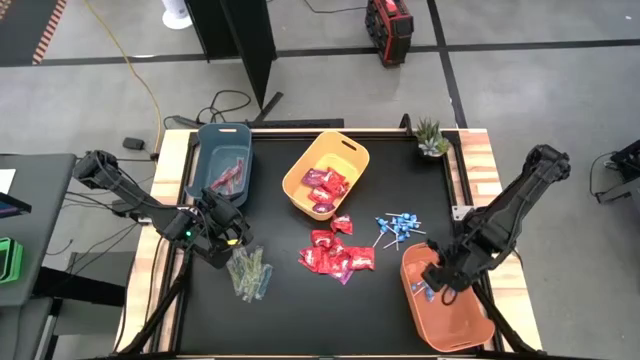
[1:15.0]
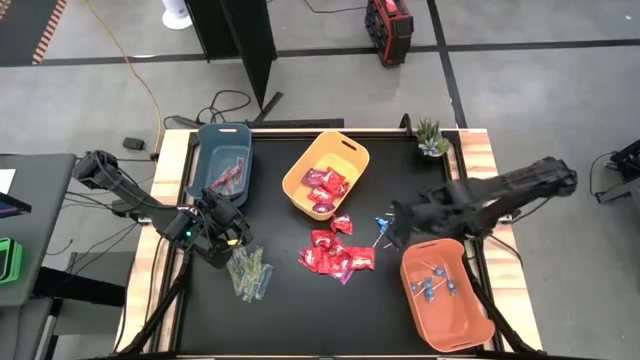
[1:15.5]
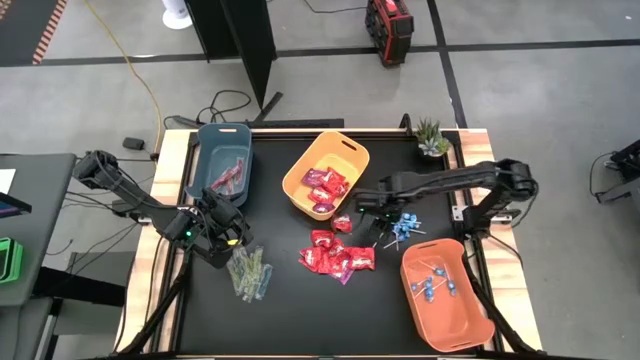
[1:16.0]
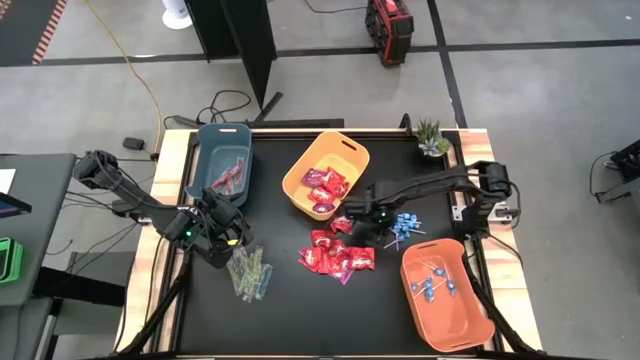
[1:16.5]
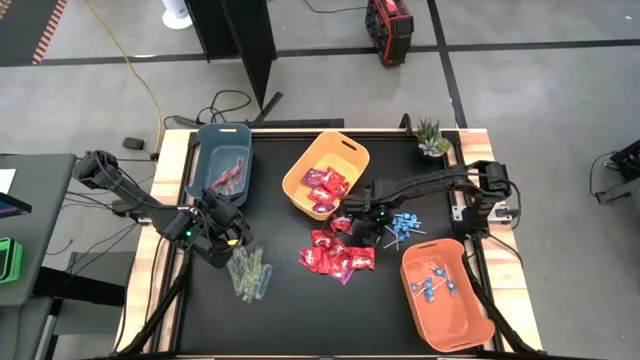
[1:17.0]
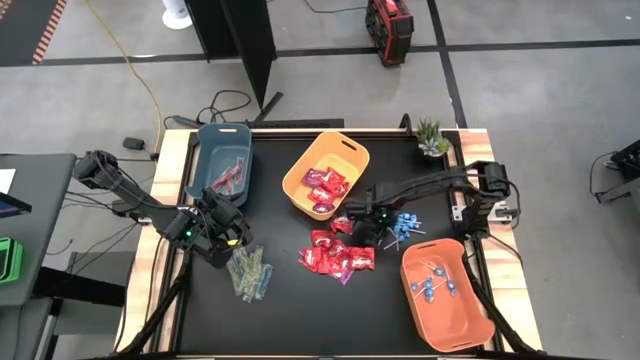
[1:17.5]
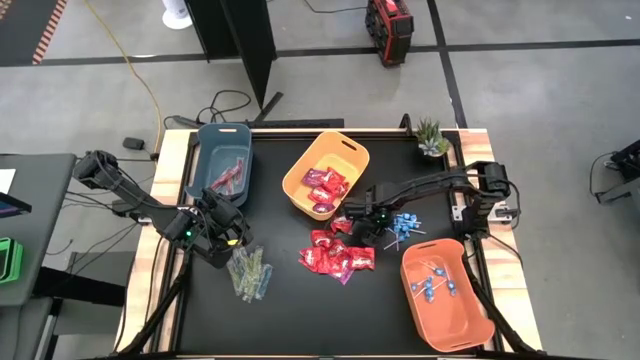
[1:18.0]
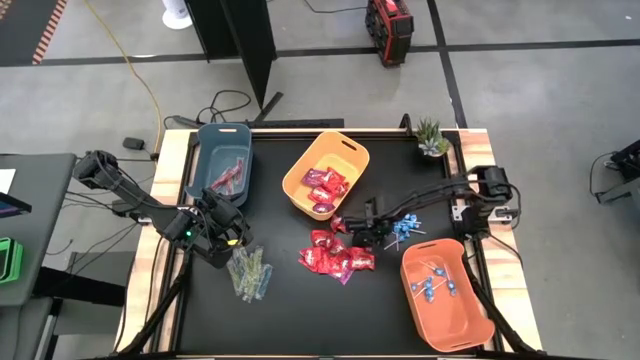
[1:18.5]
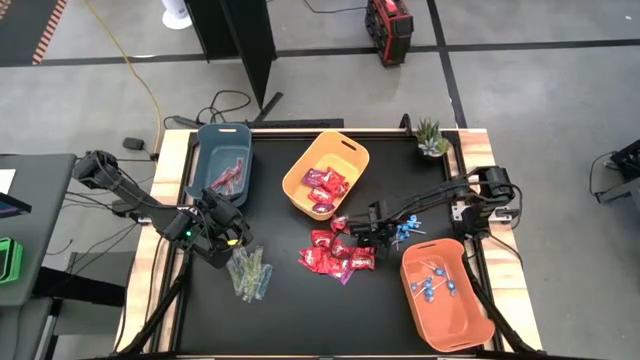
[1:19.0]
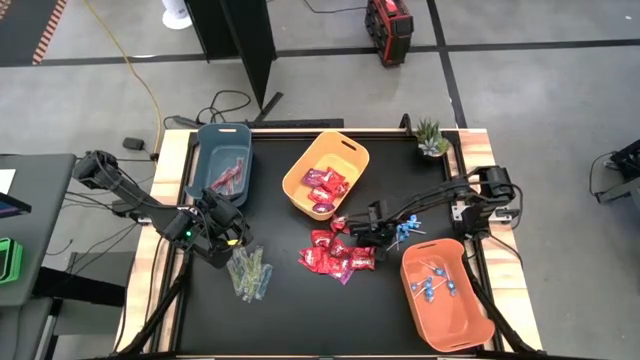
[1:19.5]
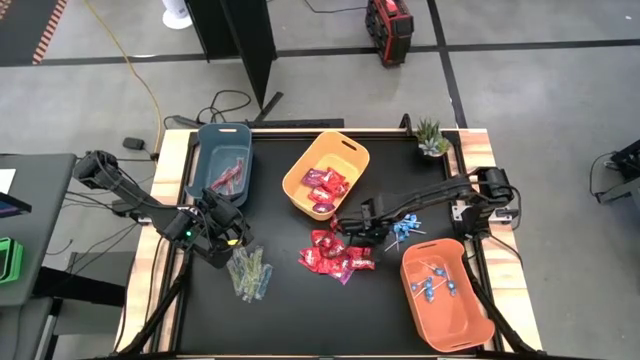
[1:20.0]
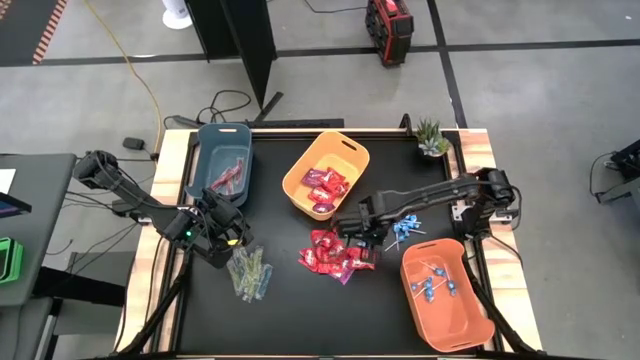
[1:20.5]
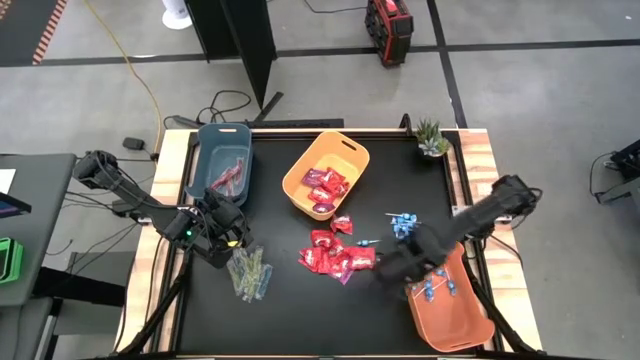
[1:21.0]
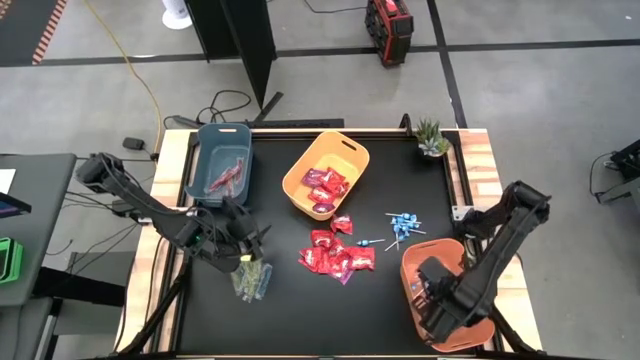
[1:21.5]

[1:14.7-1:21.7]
Task: Sort candy
Put the blue lollipop into the orange bin

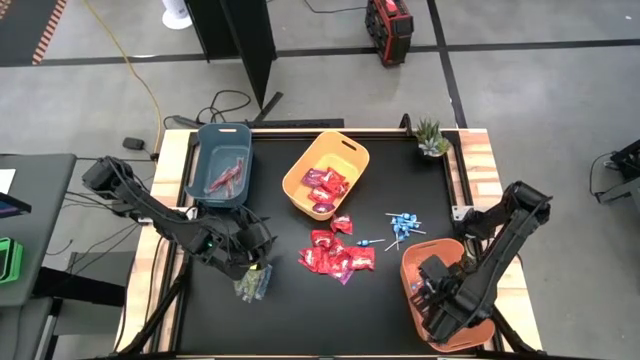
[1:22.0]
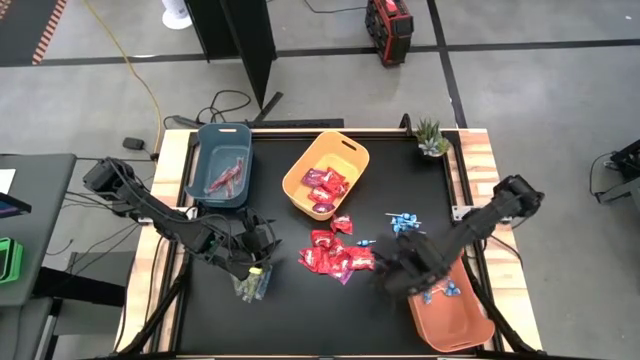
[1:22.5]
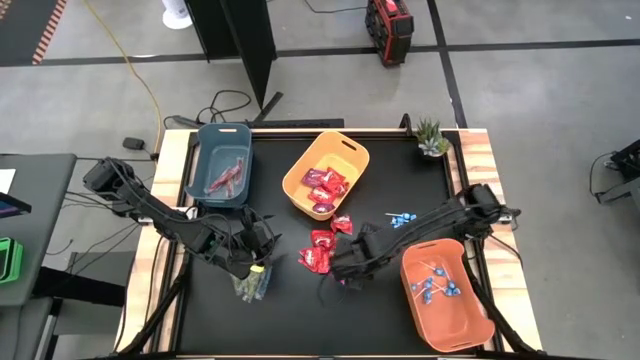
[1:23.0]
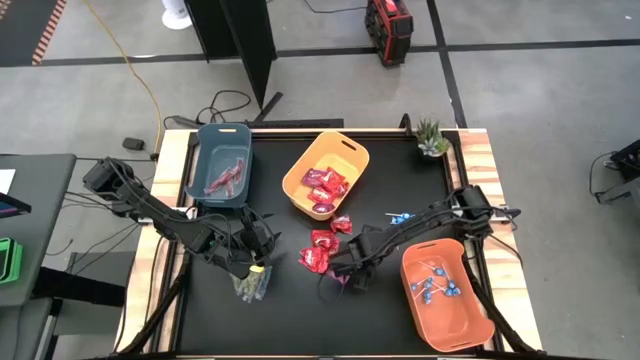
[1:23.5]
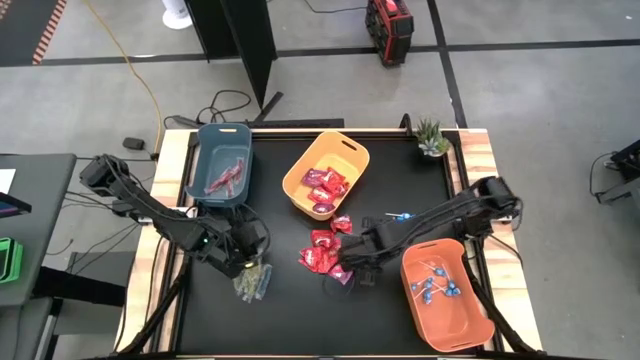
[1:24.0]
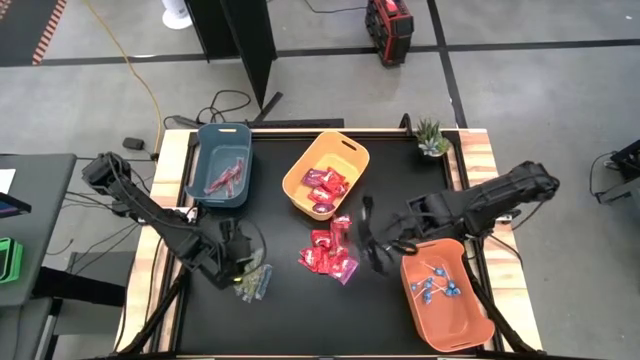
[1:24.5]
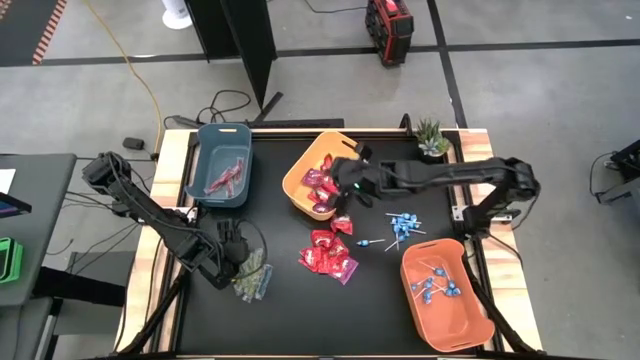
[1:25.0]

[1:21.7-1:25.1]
Put the red candy into the yellow bin

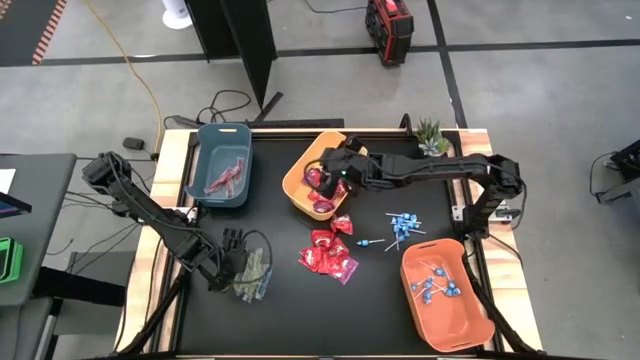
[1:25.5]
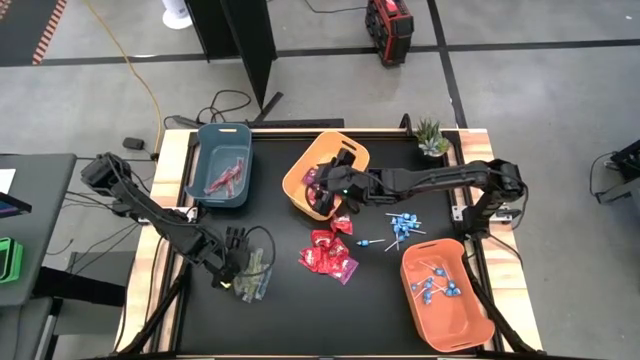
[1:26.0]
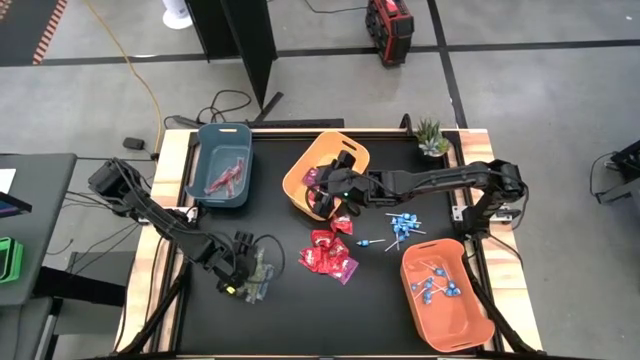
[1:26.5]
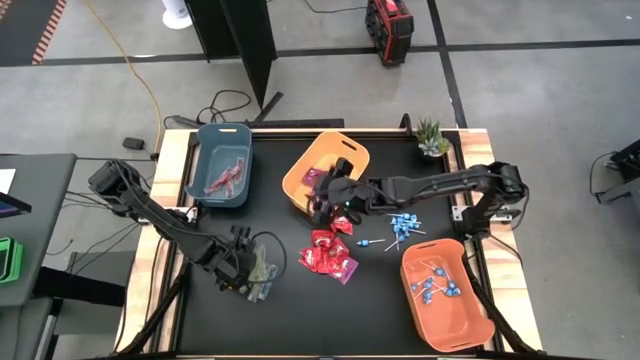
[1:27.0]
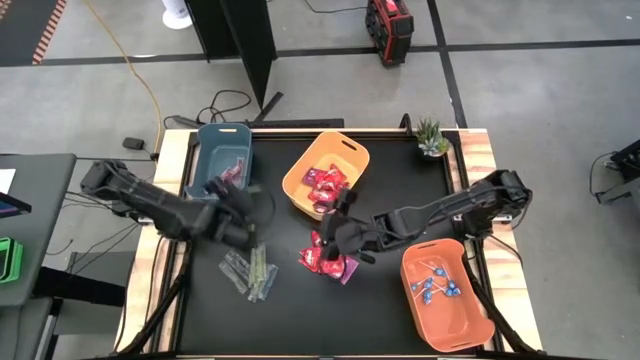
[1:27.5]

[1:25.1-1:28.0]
Put the yellow gummy into the blue bin

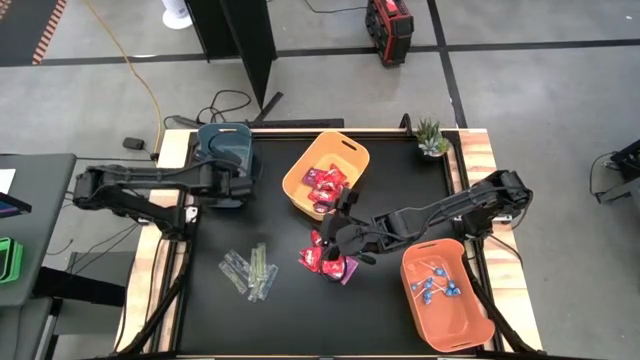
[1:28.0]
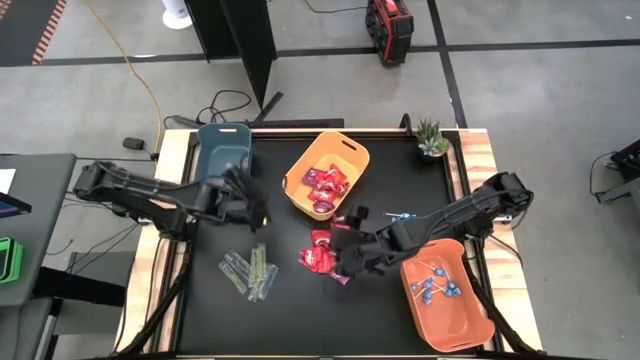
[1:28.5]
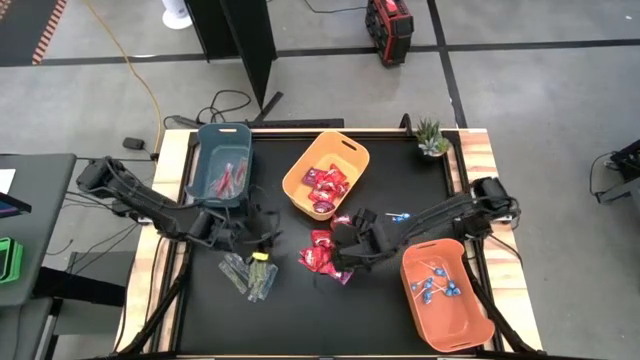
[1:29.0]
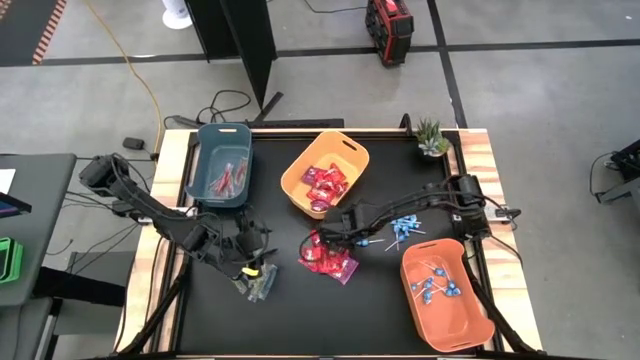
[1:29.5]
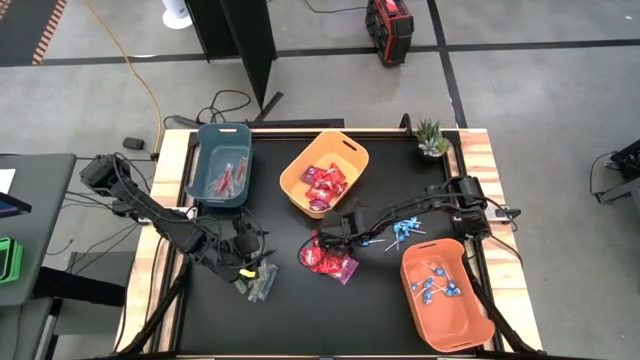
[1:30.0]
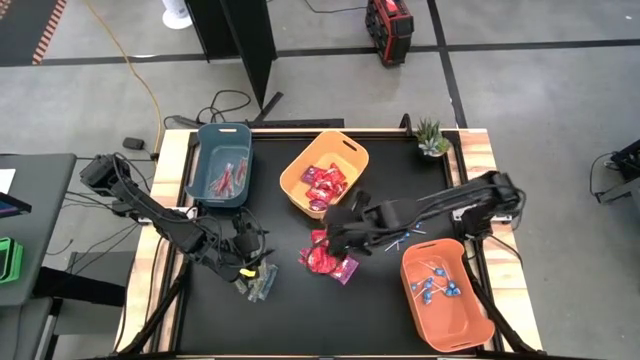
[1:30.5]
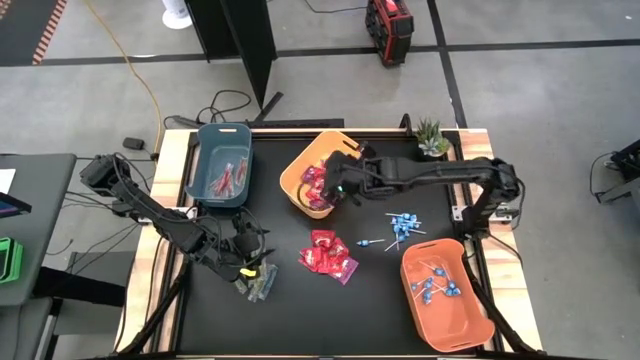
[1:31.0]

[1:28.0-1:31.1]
Put the red candy into the yellow bin

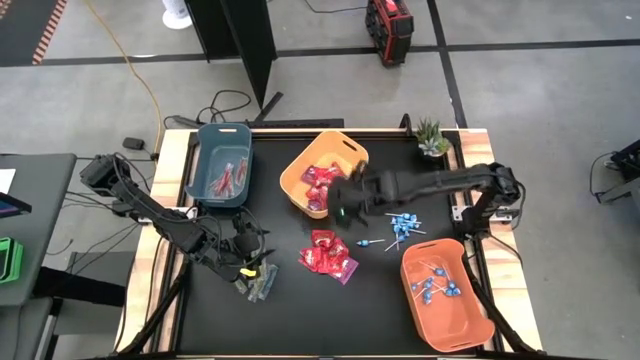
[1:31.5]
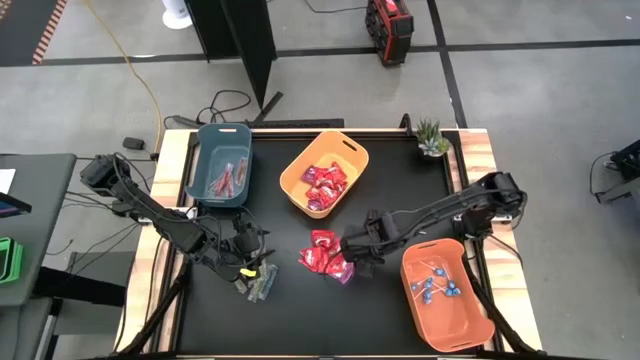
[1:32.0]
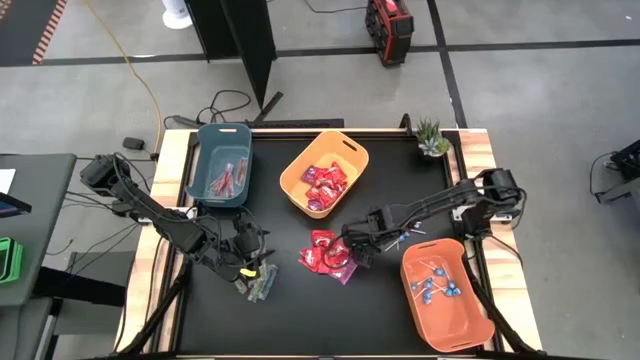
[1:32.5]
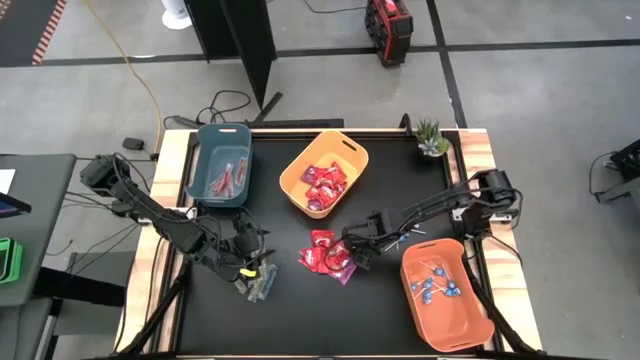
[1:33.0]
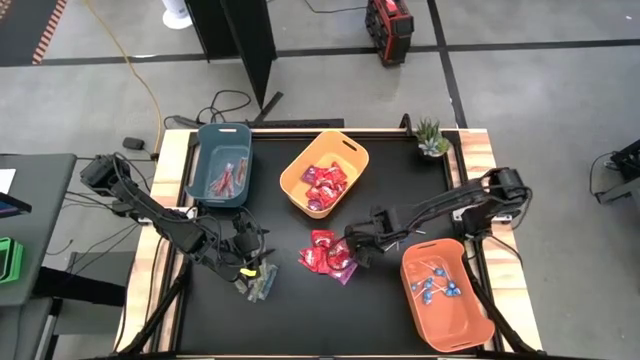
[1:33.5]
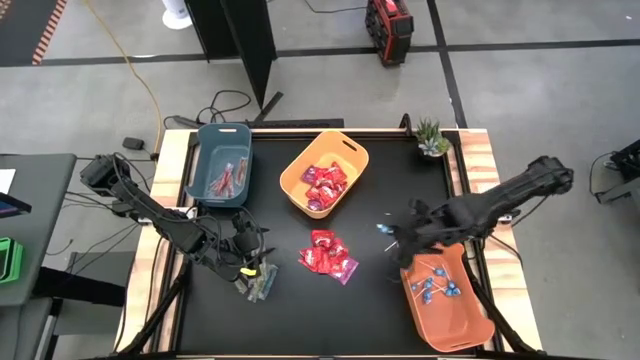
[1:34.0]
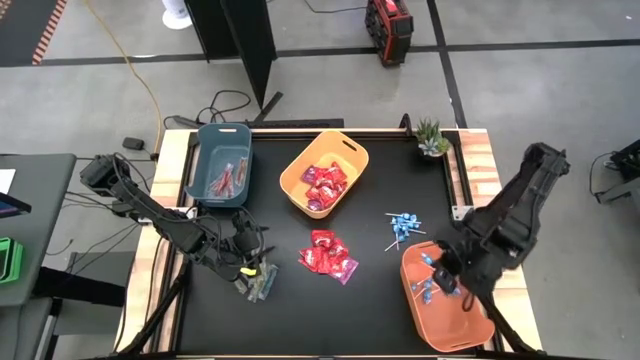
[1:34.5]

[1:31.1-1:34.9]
Put the blue lollipop into the orange bin

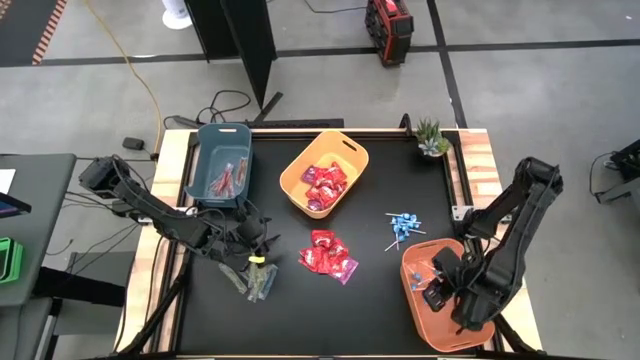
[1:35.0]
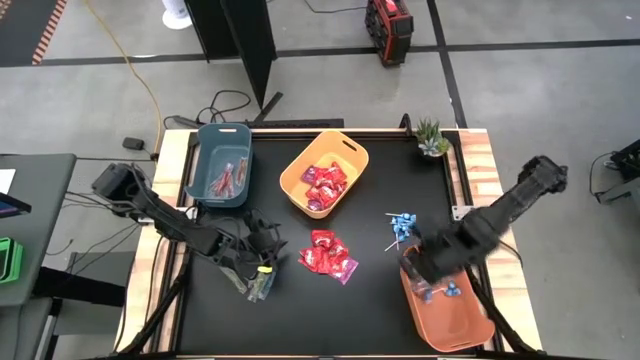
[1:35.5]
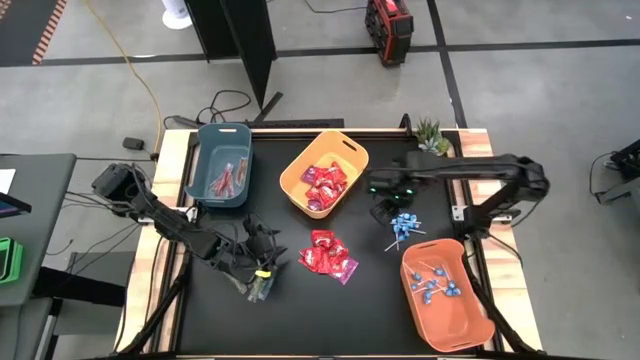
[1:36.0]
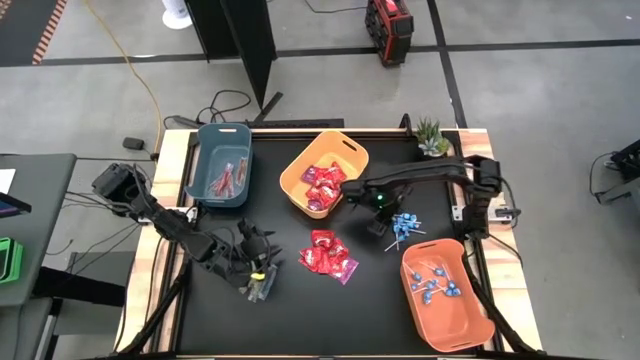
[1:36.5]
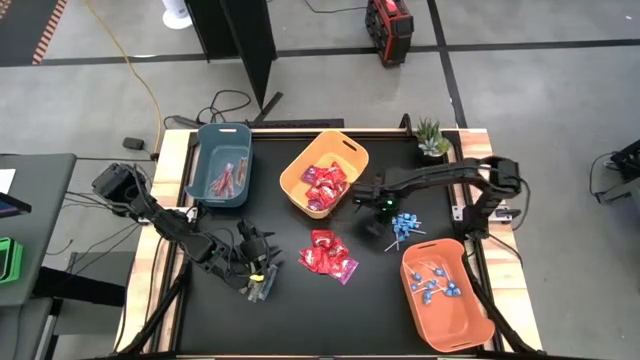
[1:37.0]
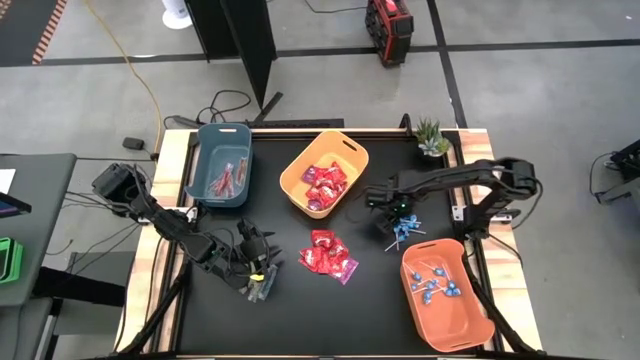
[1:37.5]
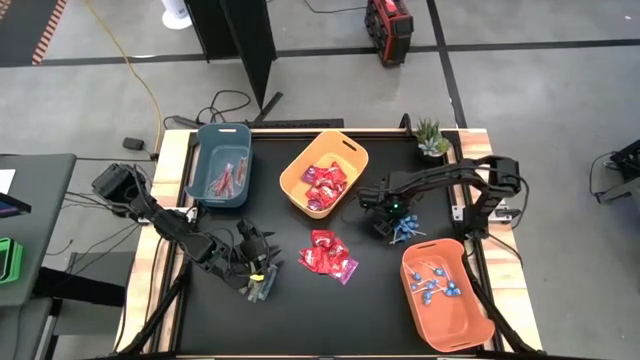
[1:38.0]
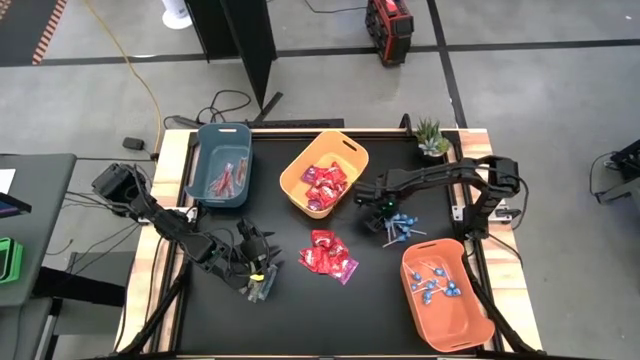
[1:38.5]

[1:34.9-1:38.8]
Put the blue lollipop into the orange bin
